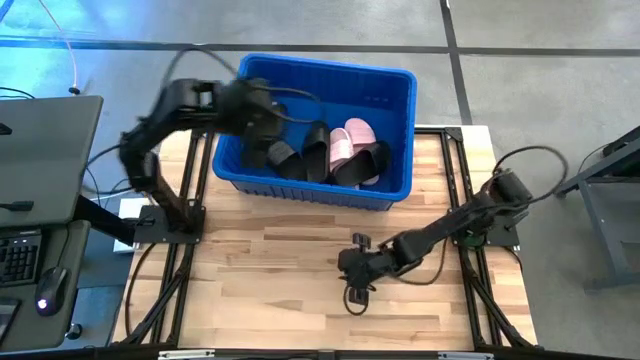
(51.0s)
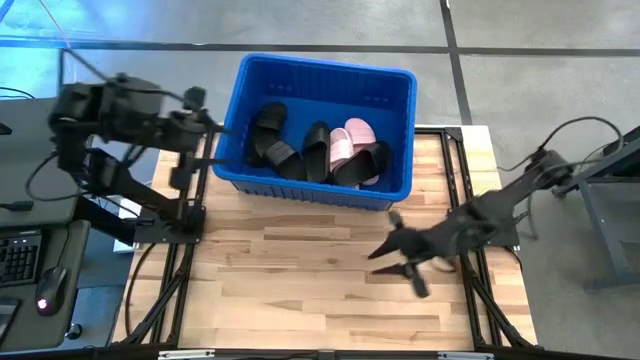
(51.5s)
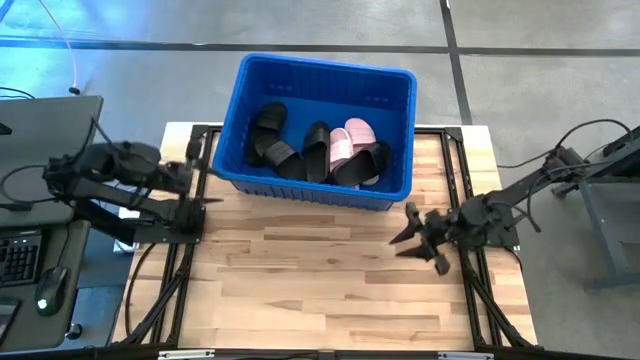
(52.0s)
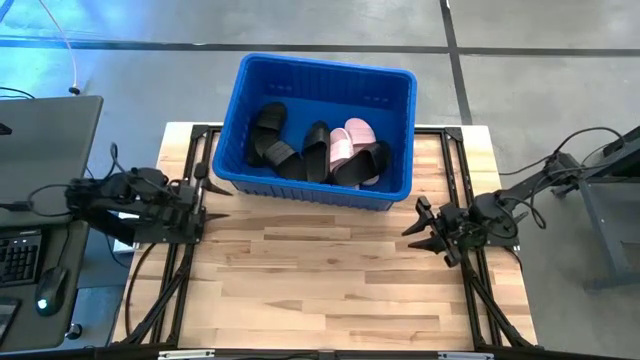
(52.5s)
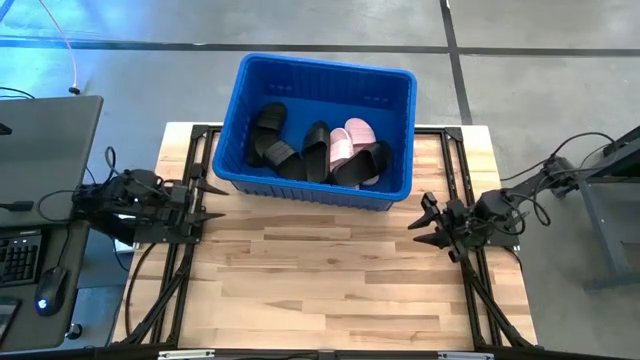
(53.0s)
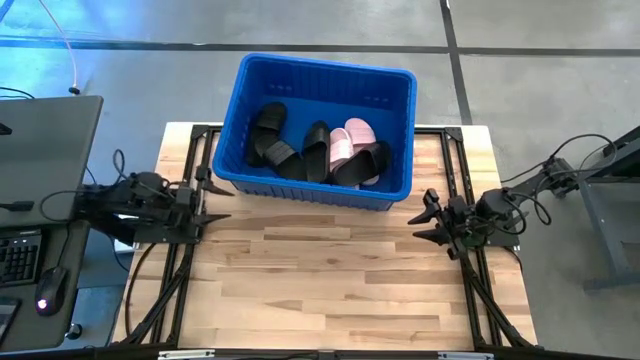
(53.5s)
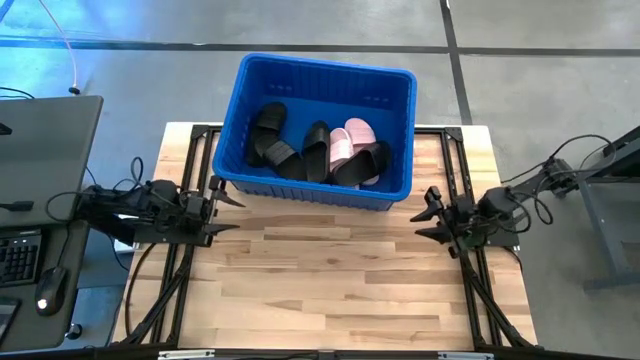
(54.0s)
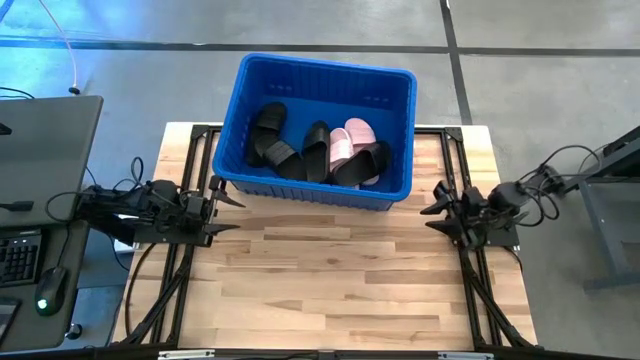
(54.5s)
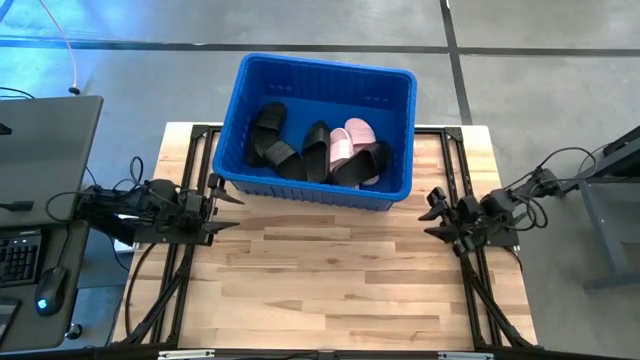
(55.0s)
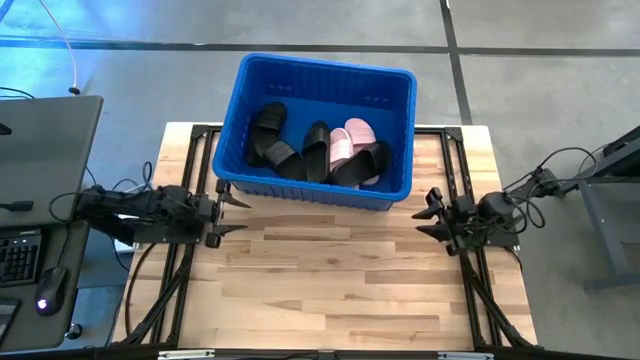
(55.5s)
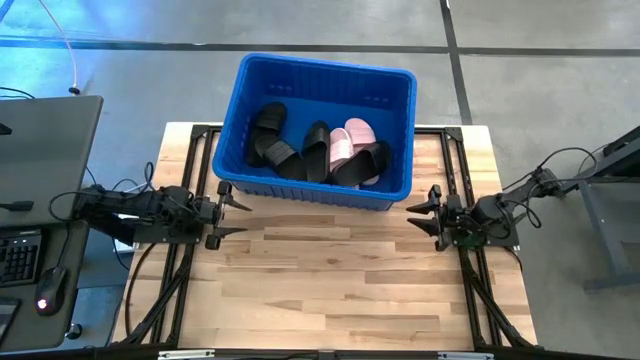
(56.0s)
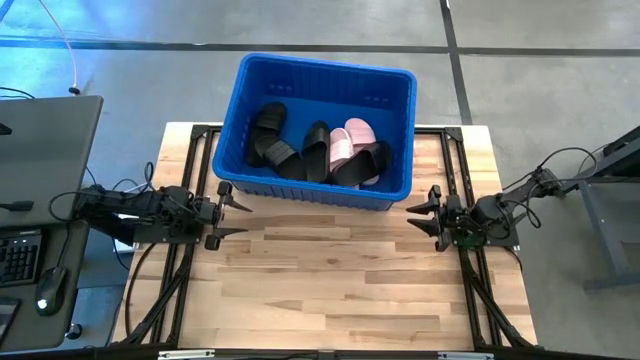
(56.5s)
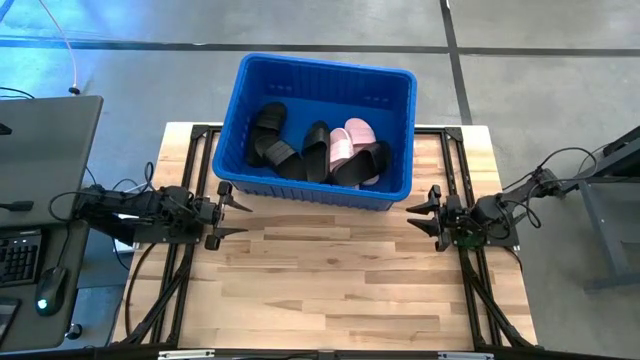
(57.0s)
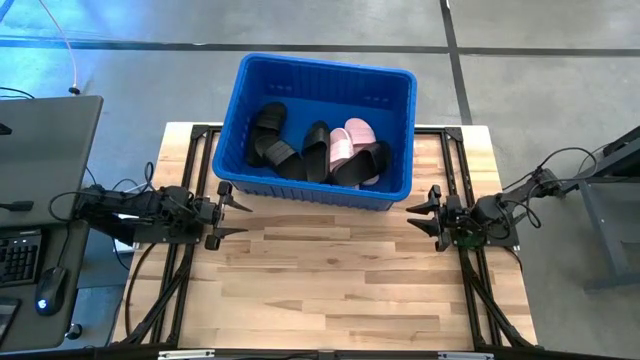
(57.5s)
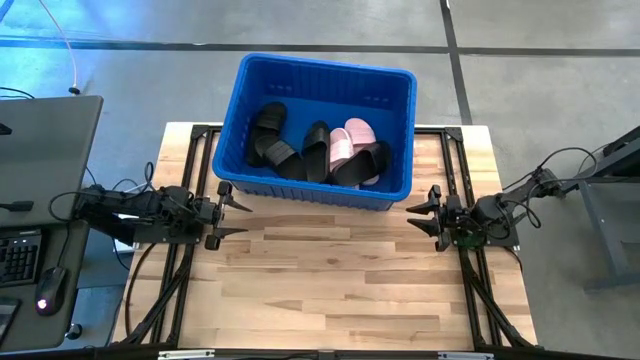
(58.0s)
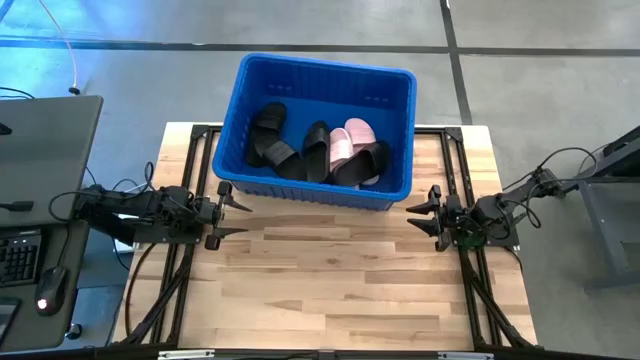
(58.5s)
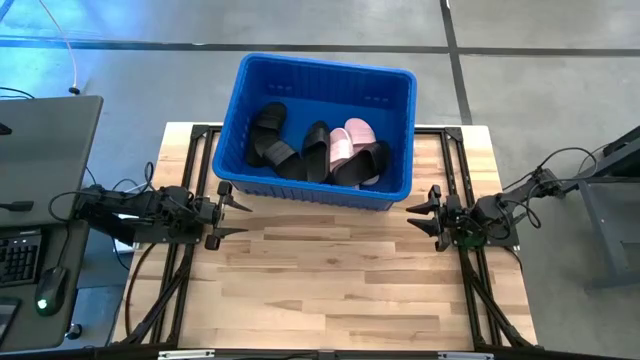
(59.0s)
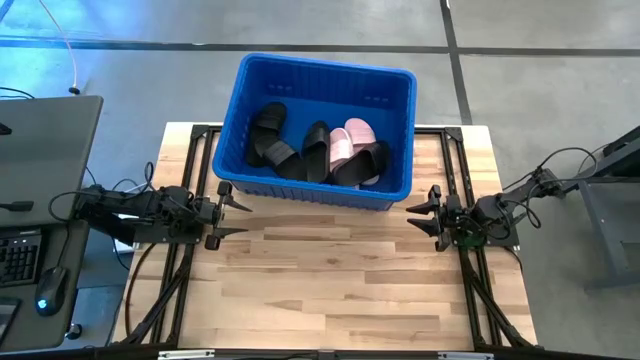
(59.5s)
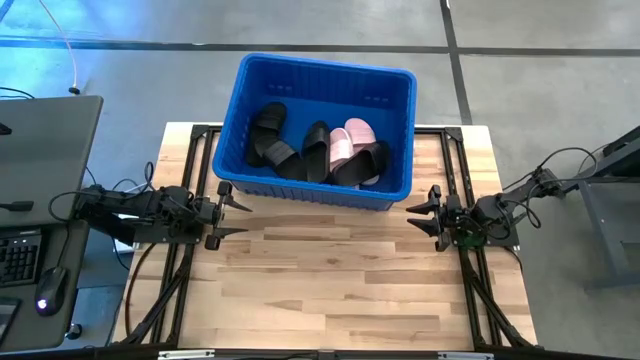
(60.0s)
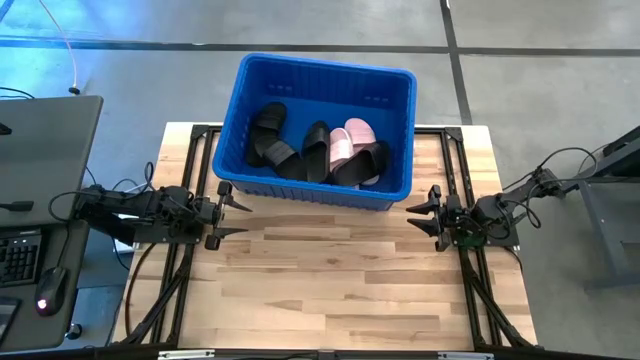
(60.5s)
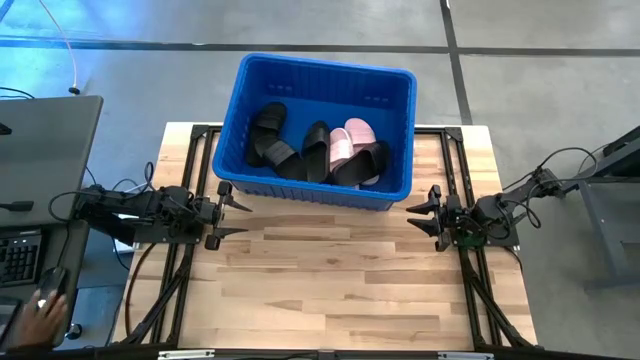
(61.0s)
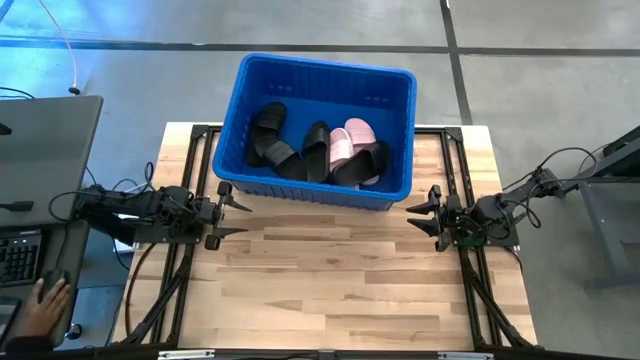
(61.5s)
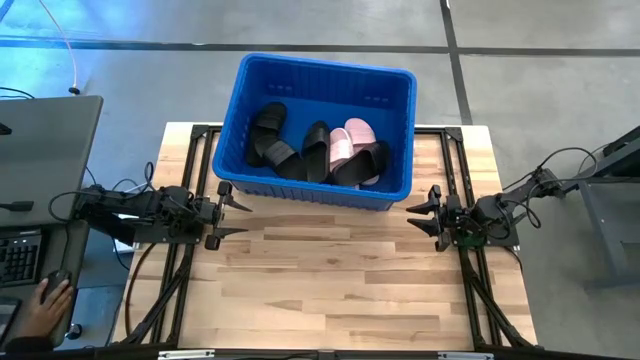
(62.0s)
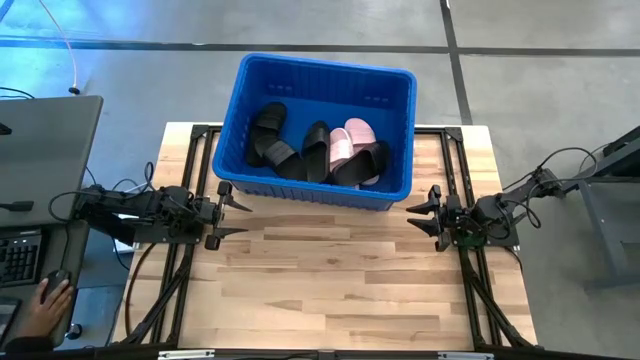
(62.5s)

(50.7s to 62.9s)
Task: Pick and place slides into bin
Return to Home Position

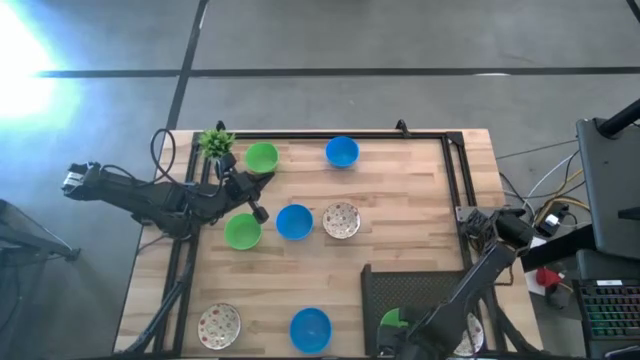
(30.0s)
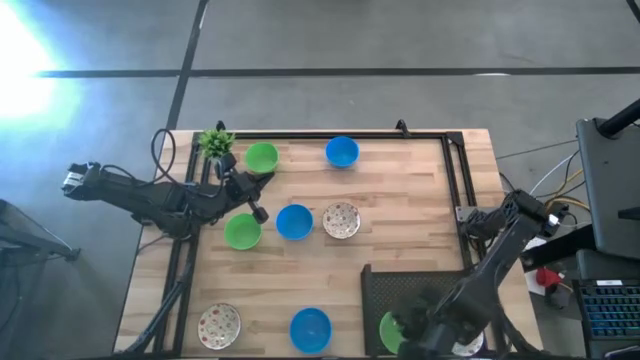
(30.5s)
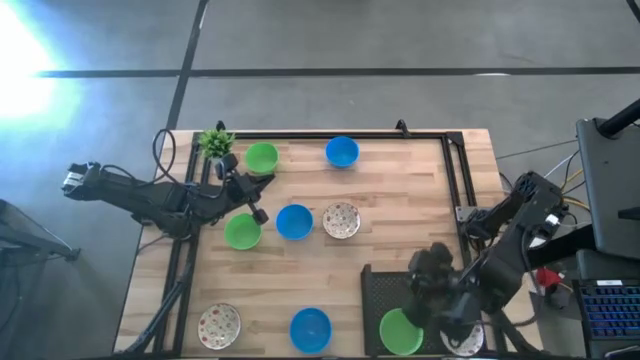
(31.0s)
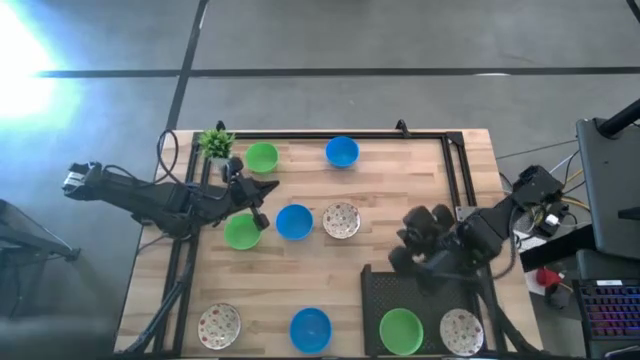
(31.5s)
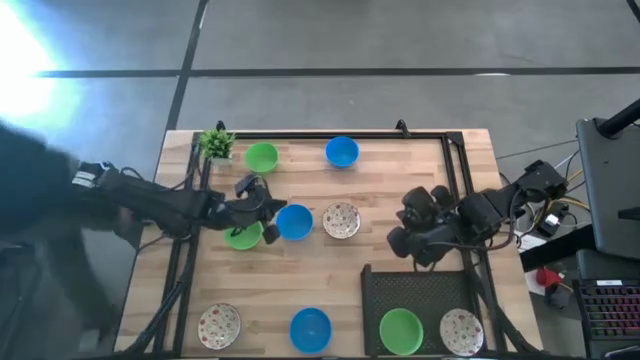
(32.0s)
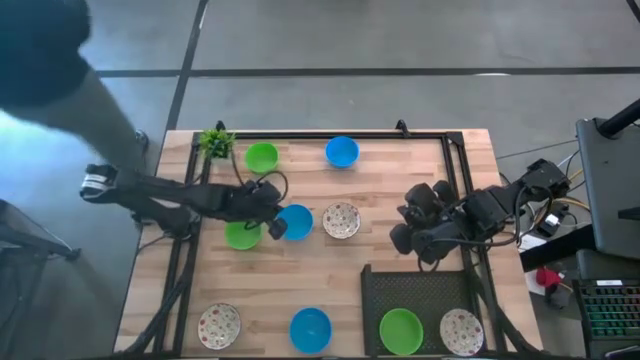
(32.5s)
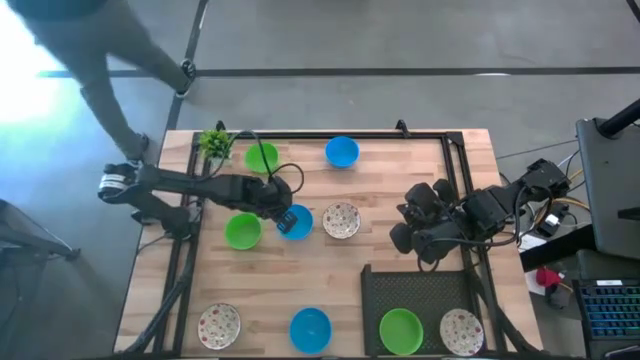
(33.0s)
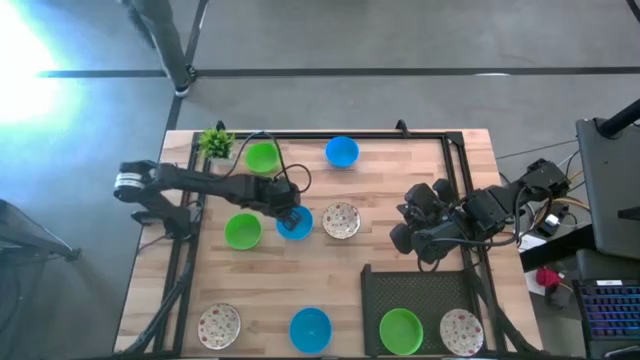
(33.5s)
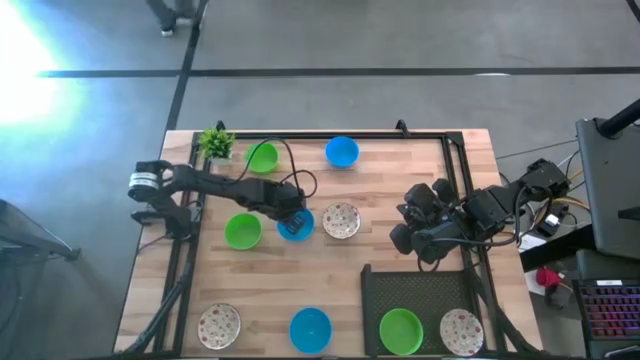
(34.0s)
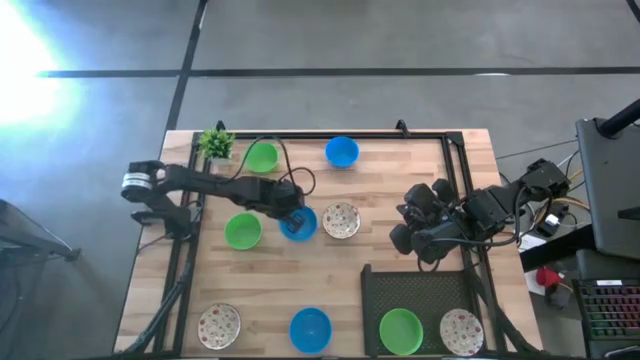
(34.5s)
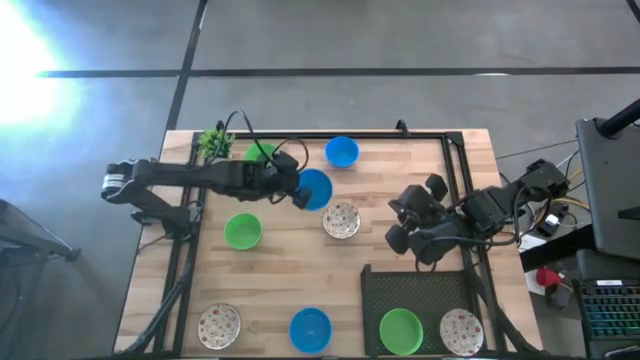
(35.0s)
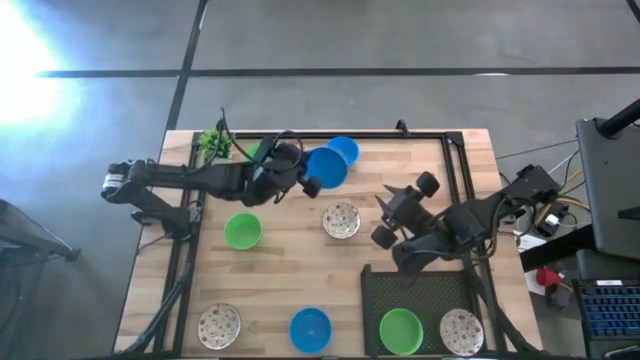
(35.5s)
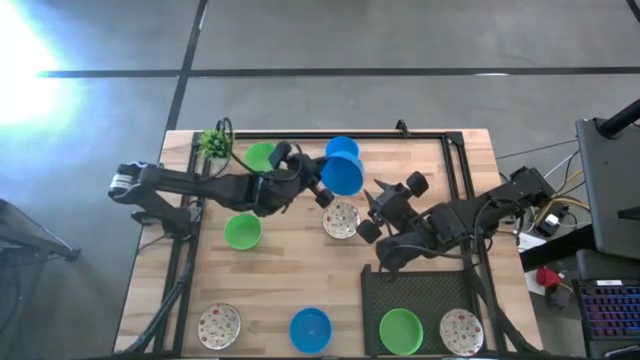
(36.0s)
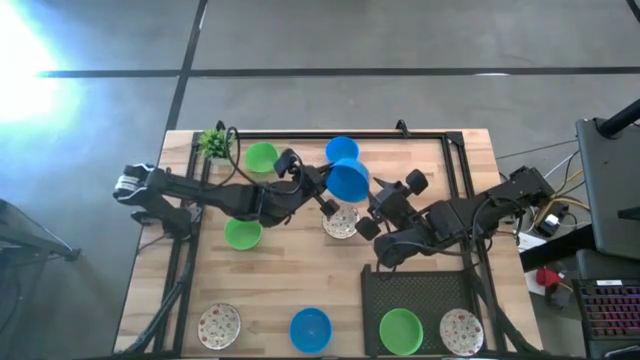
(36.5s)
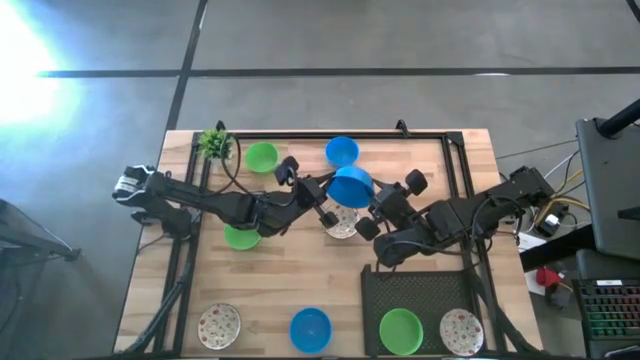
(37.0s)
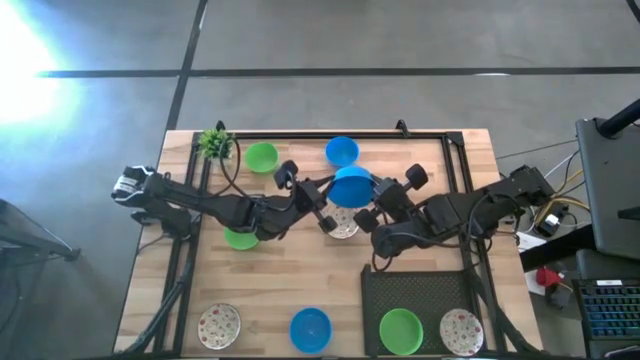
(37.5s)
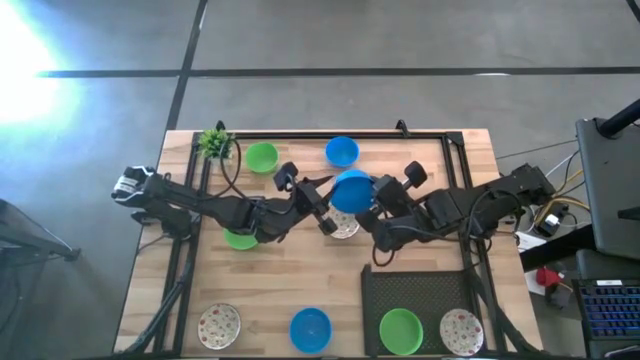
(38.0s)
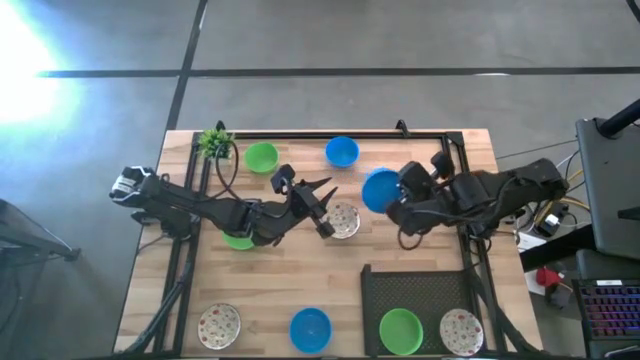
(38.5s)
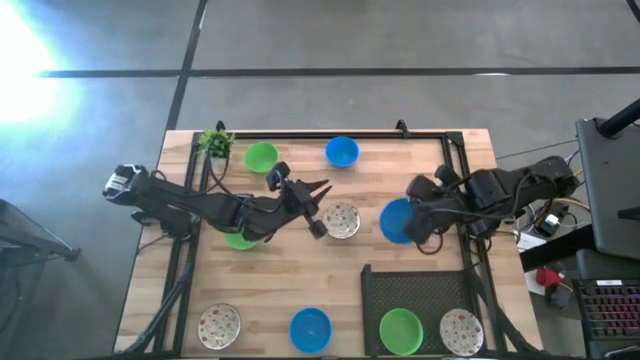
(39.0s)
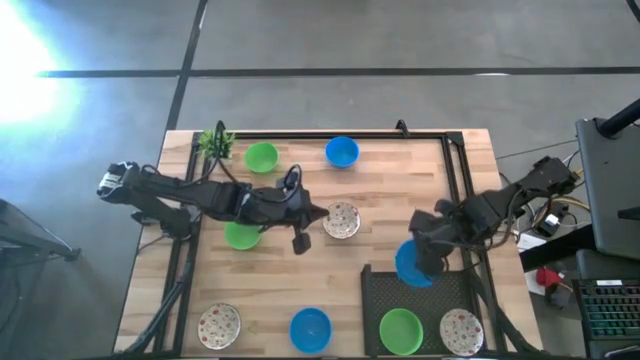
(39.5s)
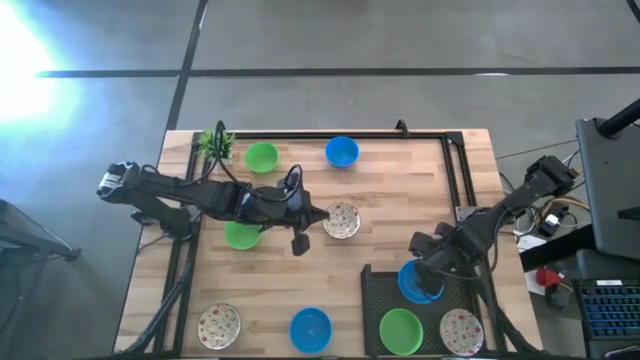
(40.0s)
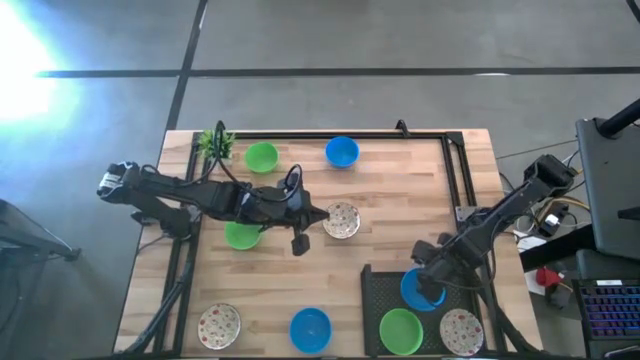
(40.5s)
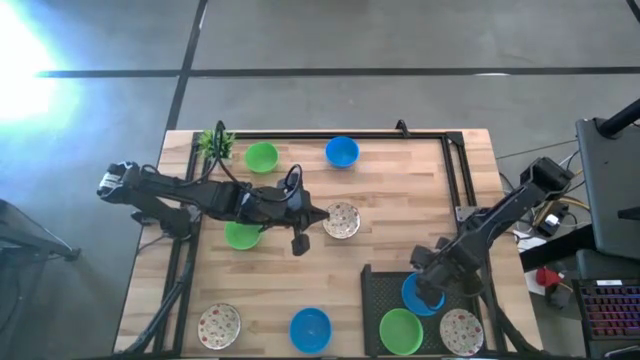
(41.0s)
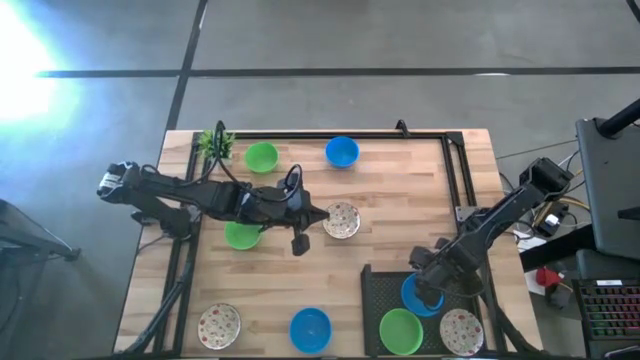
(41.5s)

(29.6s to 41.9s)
Task: Pick & Place Mini bowls
Put the middle blue bowl on the shelf
